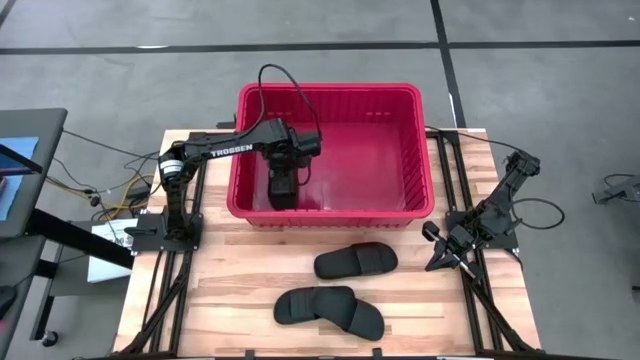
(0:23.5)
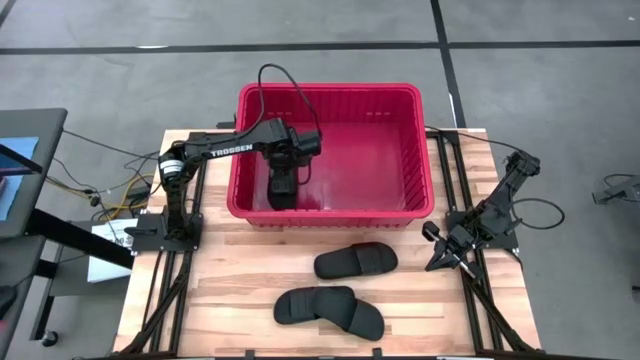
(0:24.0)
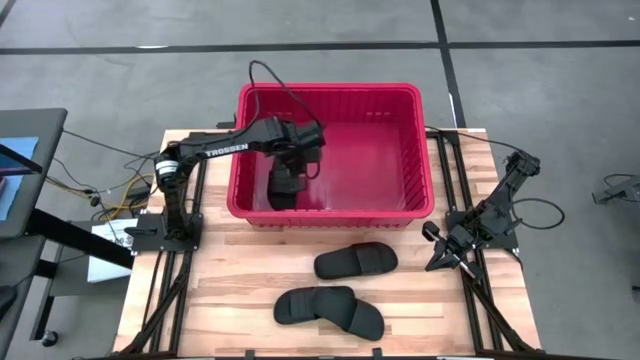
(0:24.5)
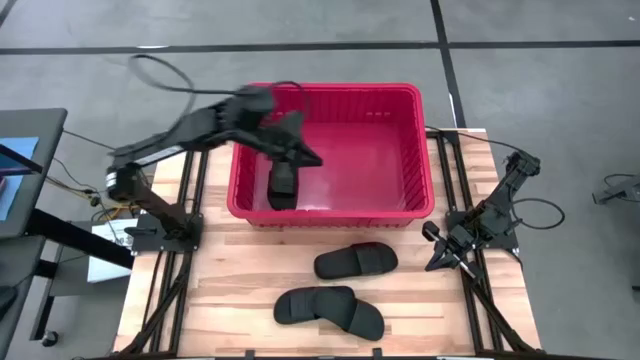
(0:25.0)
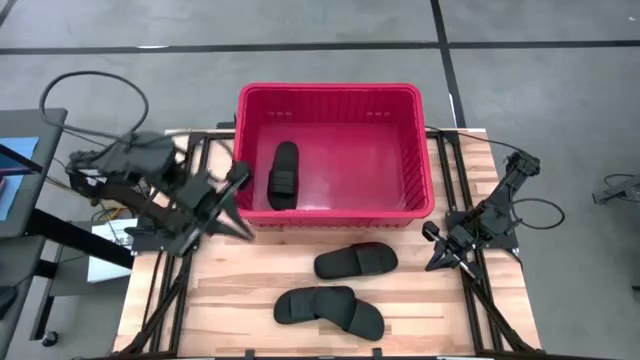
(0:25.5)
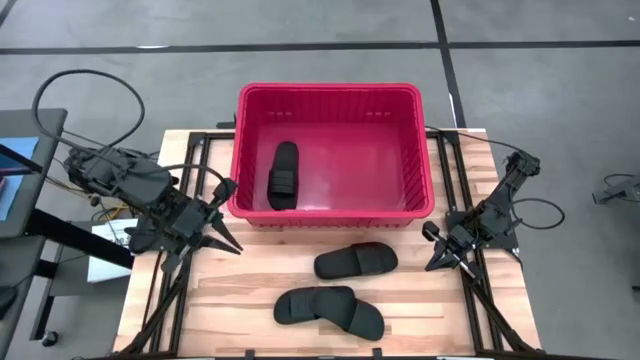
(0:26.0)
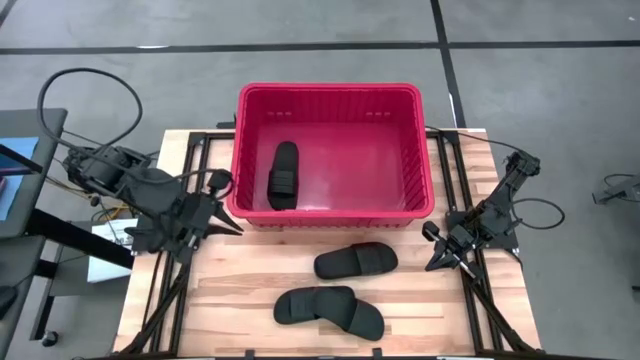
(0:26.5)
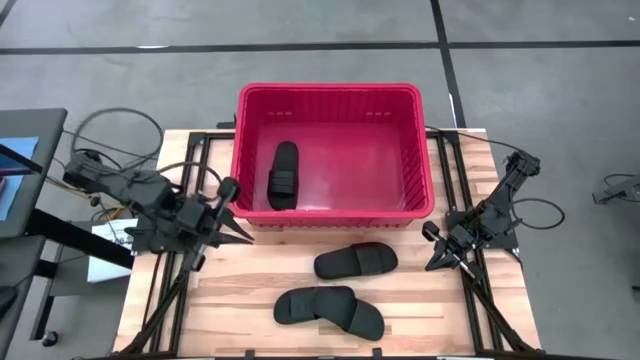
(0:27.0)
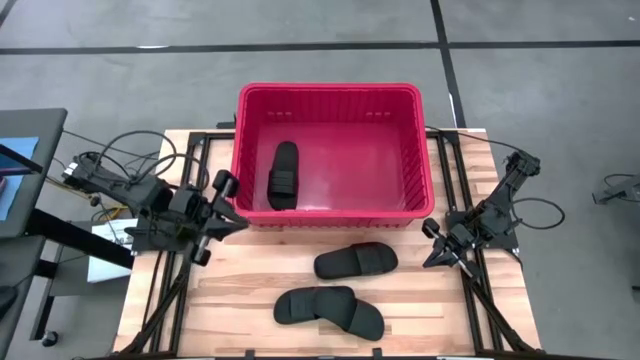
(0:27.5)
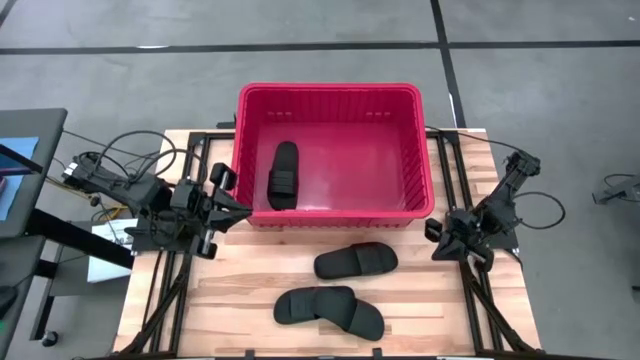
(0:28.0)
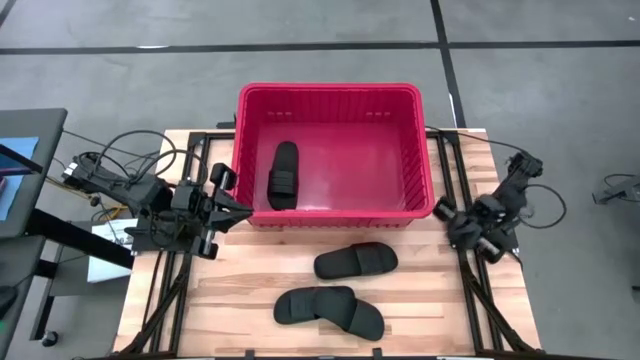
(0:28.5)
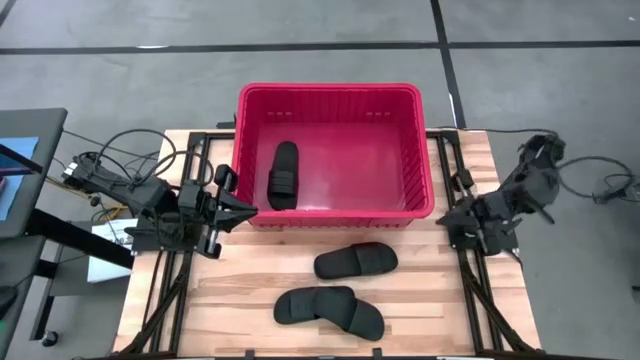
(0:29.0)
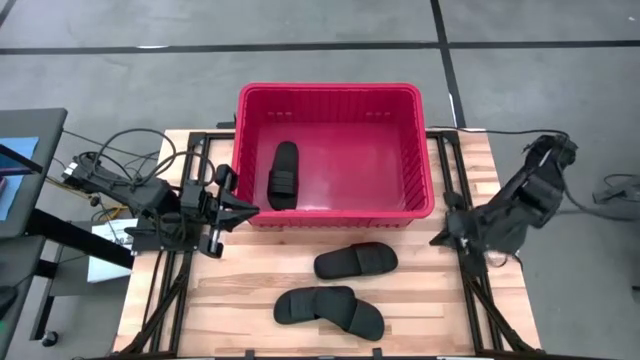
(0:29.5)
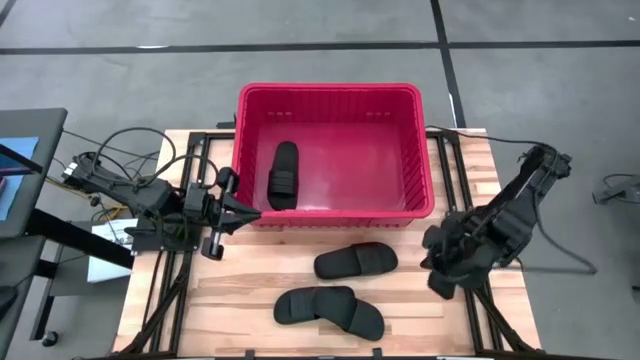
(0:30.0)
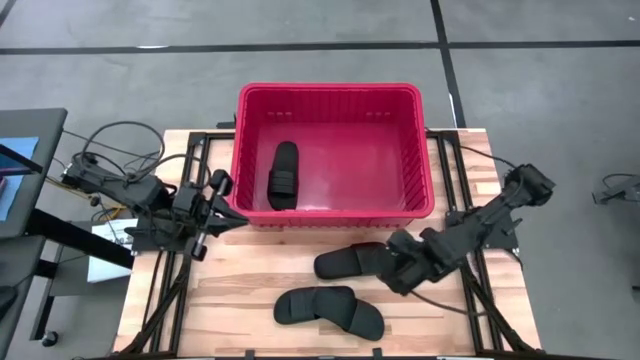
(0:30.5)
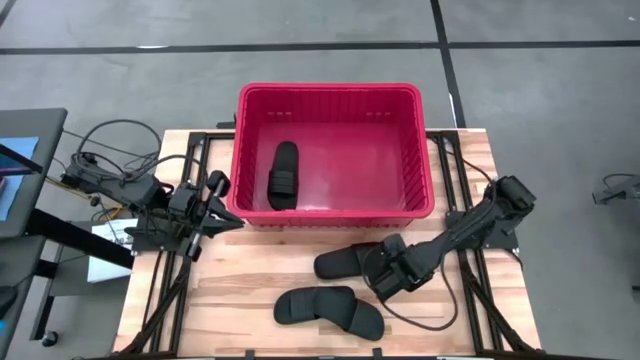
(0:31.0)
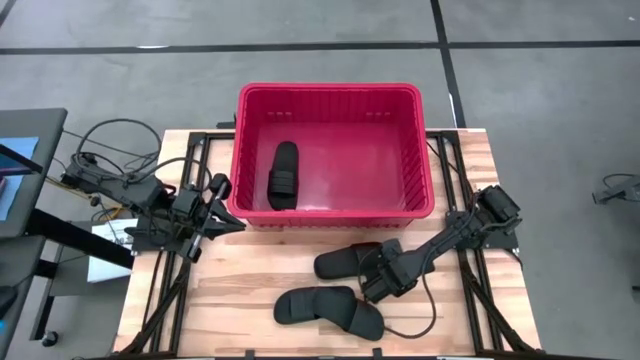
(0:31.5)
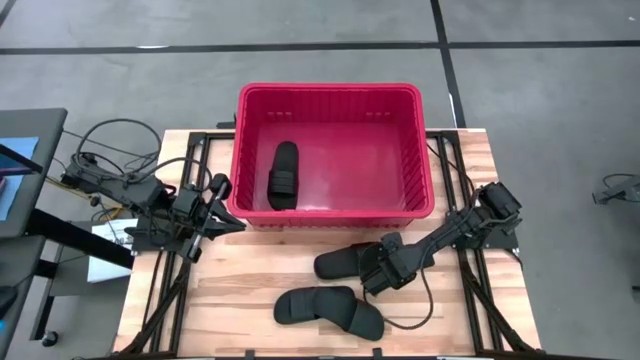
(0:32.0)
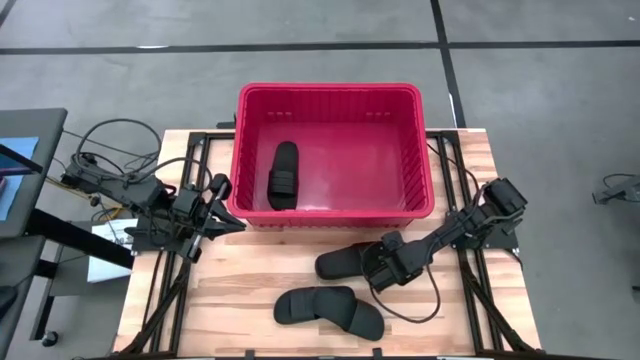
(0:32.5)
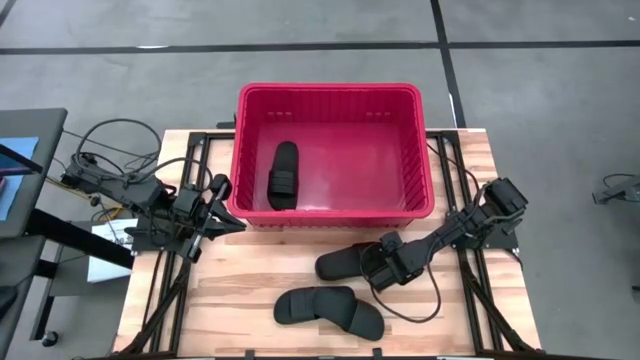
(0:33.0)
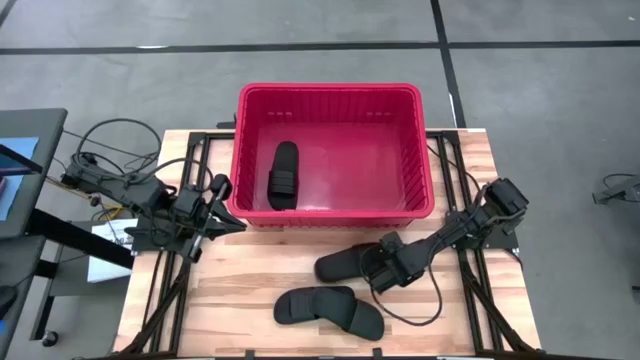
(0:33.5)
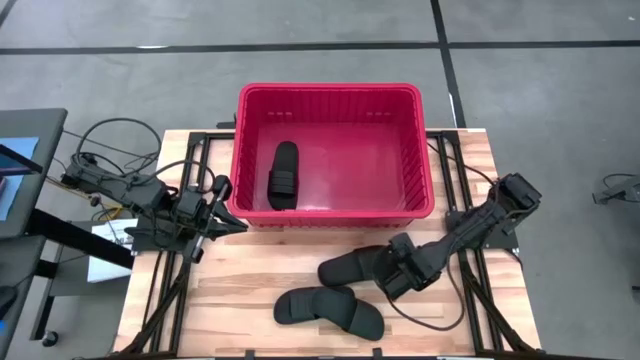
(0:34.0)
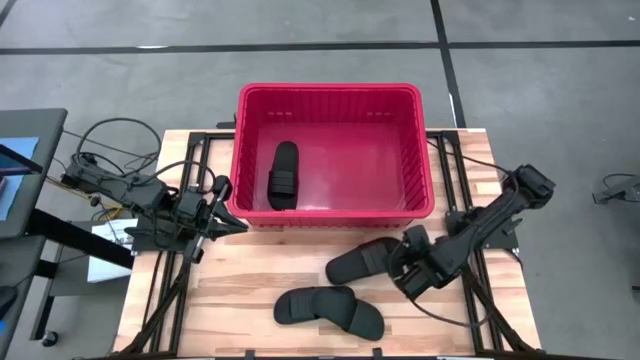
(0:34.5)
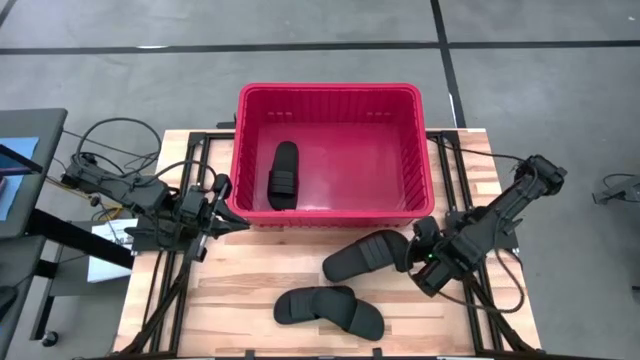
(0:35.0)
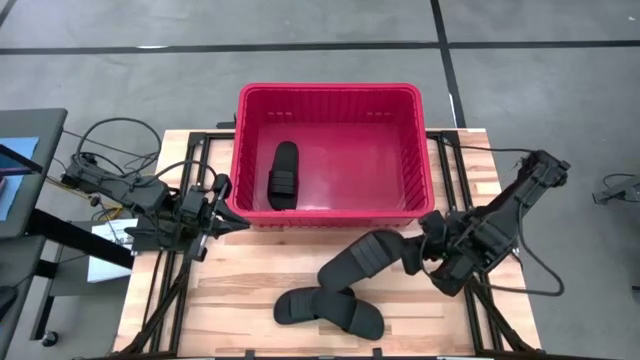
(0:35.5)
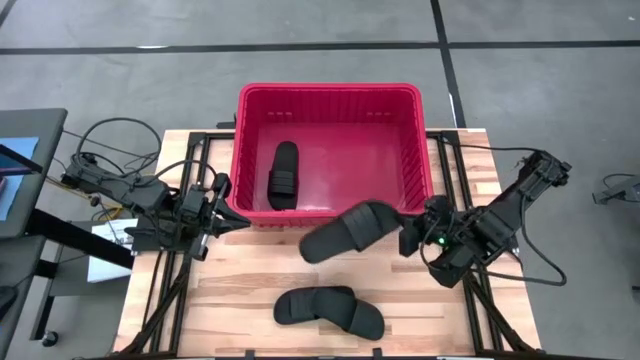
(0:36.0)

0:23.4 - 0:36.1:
Task: Pick and place slides into bin
Put the top slide into the organizer bin

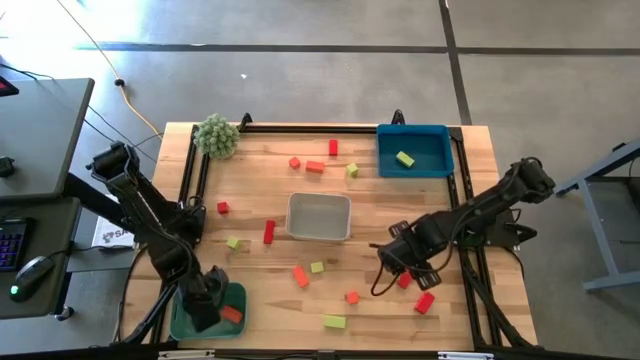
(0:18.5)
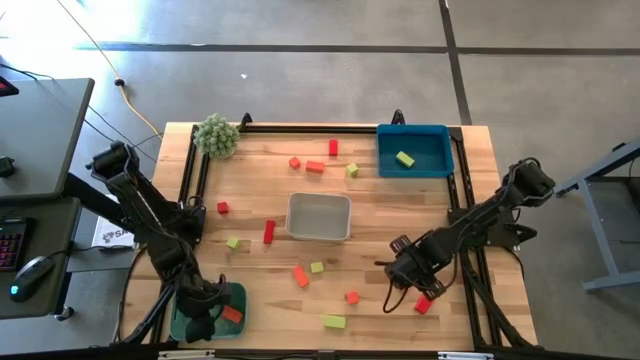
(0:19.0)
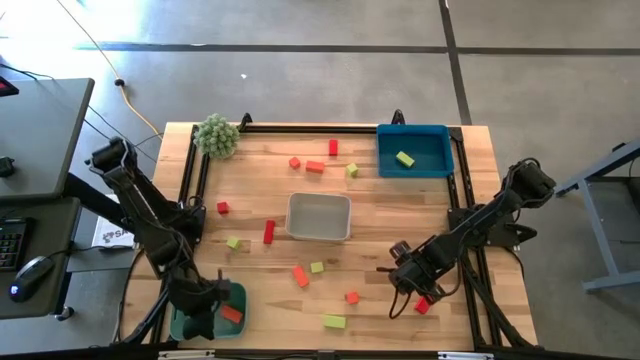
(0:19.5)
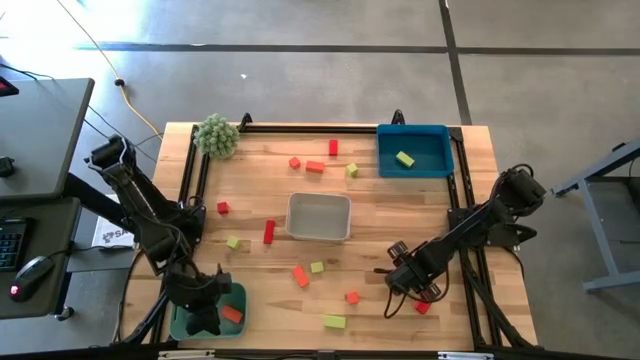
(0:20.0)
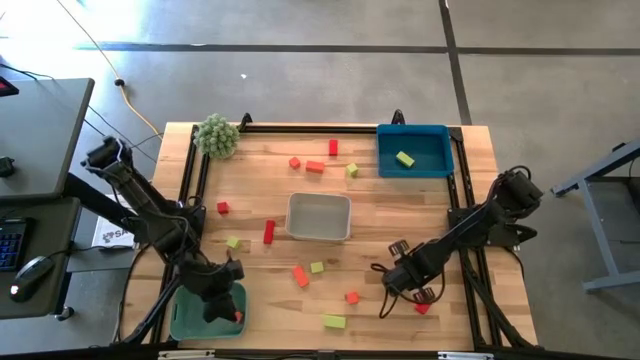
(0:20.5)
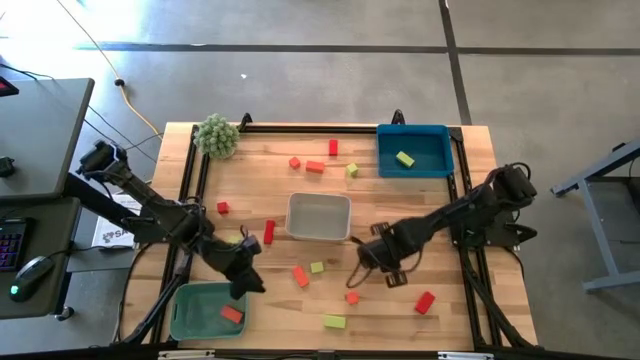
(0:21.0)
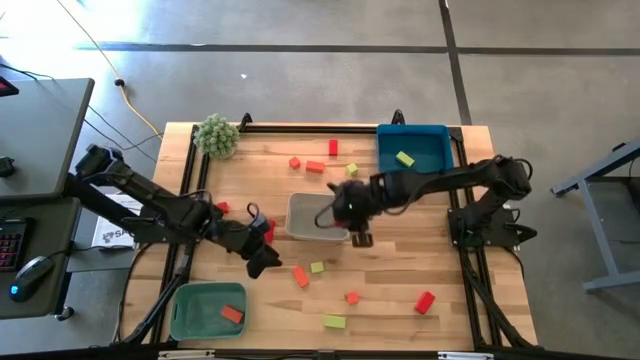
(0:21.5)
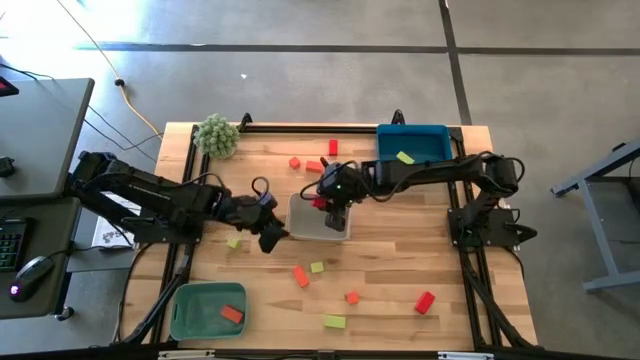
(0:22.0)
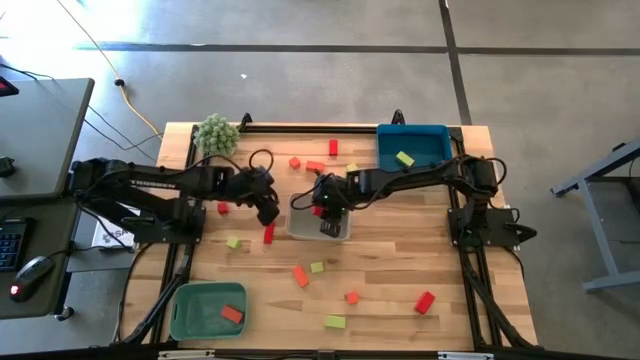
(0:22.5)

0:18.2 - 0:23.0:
Task: Sort & place blocks by color
Put the red wooden block into the white bin
